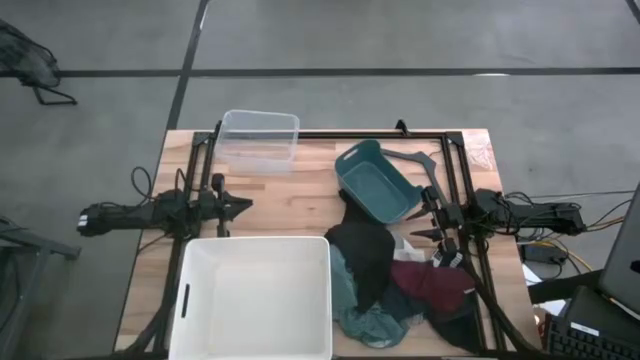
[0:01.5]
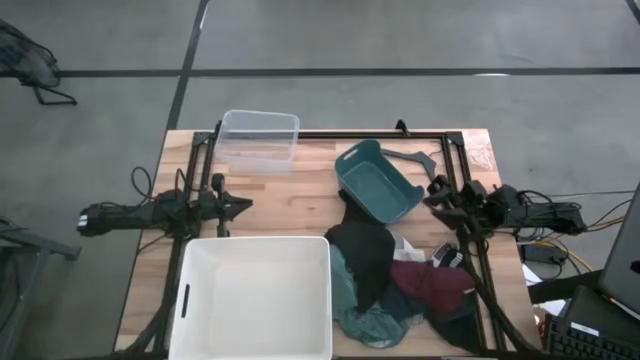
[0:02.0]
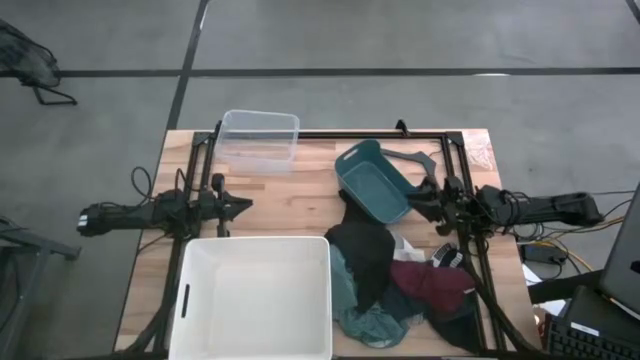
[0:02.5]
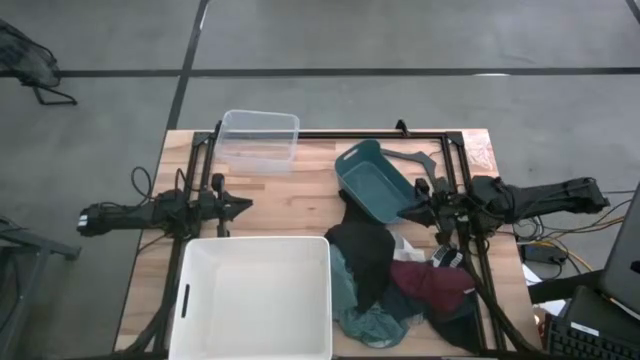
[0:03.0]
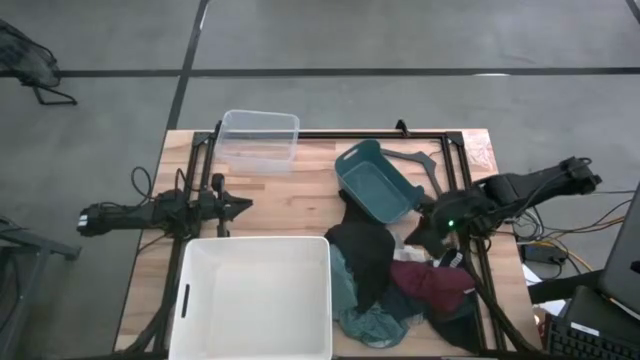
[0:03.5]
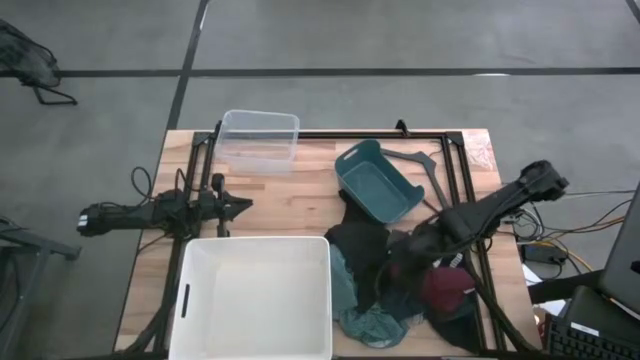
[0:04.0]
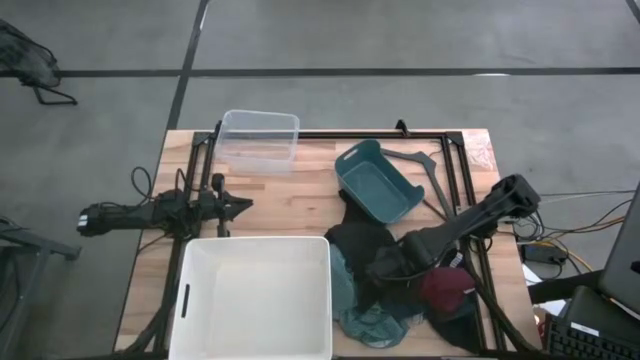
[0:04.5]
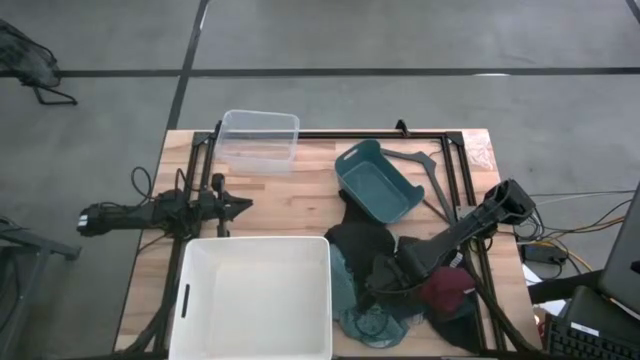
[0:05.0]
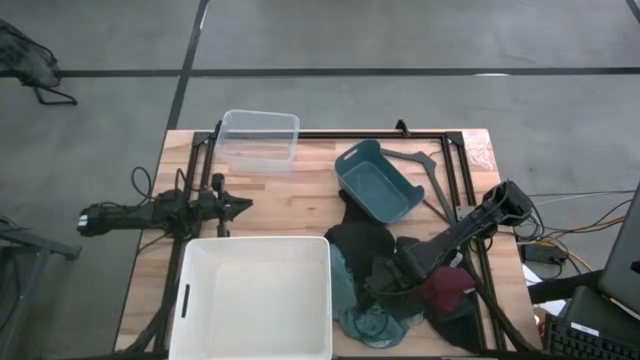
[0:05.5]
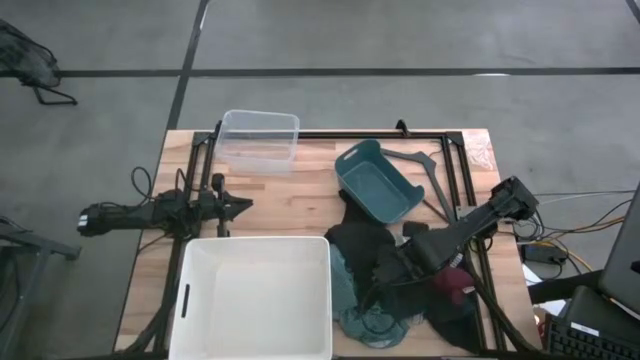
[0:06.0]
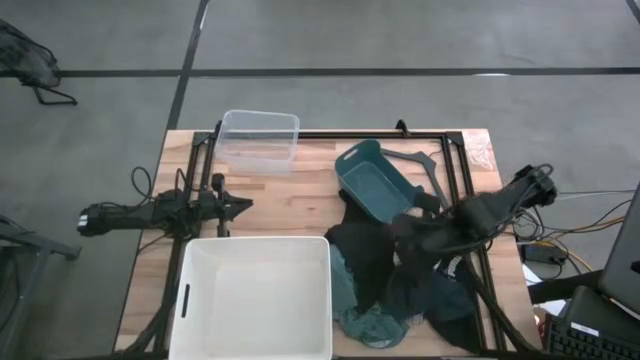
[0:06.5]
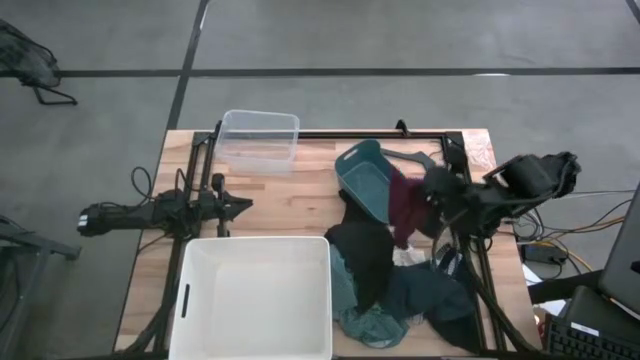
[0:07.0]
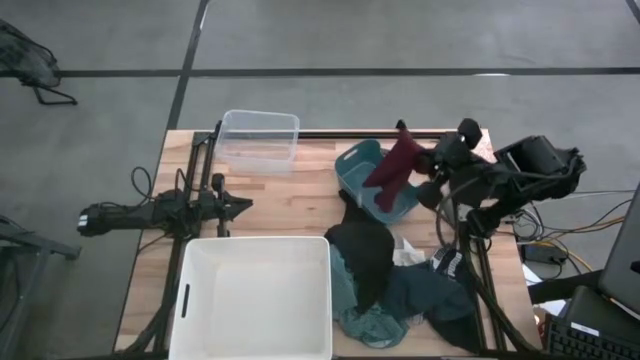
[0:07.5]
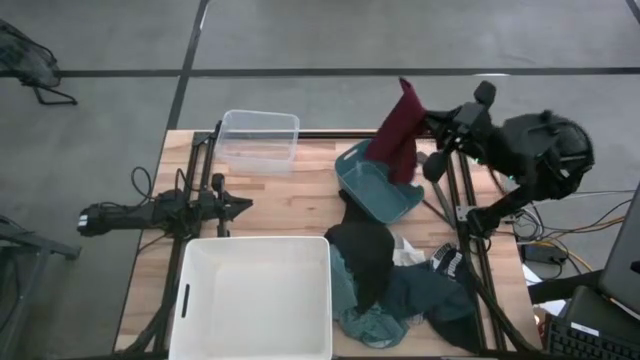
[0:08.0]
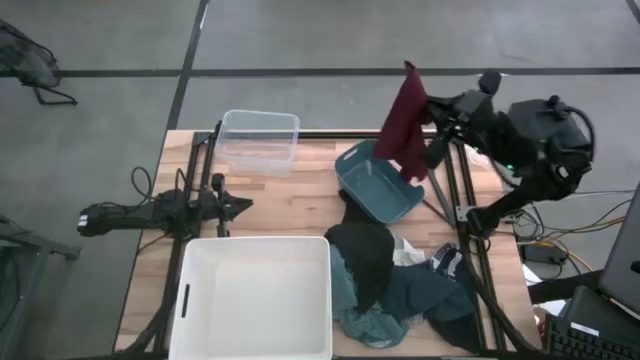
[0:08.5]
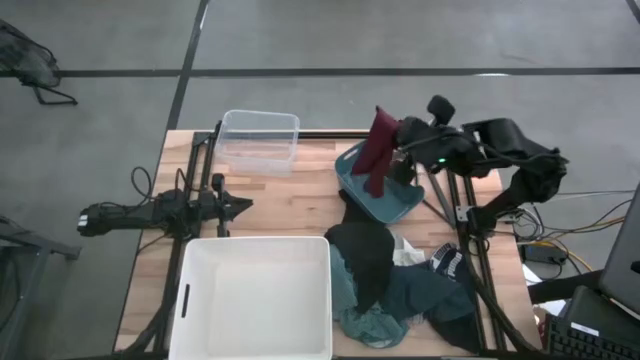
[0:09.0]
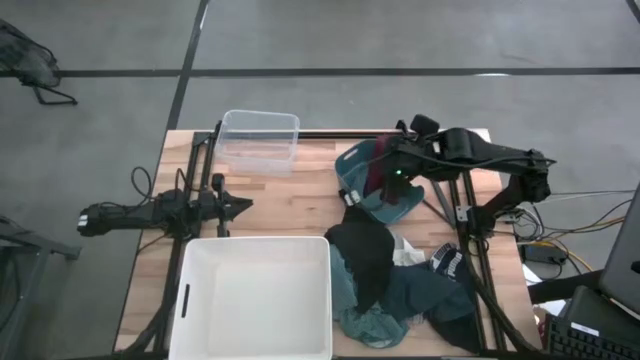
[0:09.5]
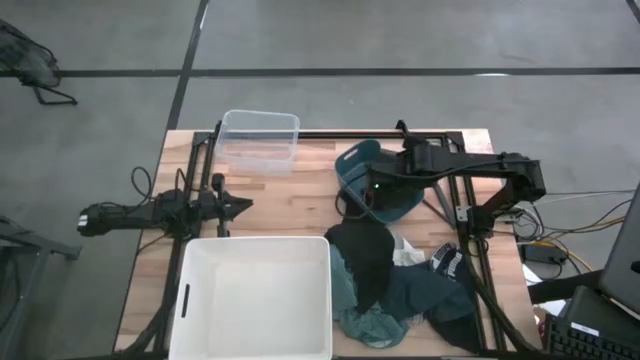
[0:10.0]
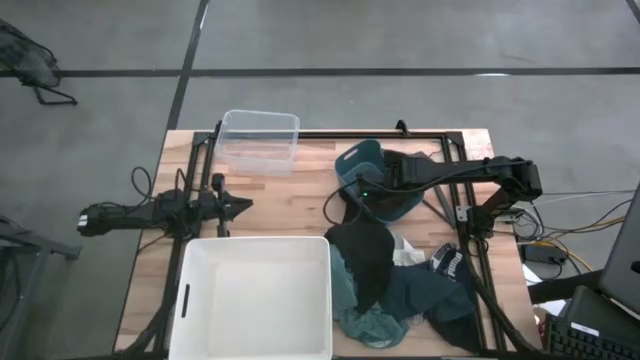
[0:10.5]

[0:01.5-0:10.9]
Task: Pick & Place Cloths
Put the red boxers into the blue bin

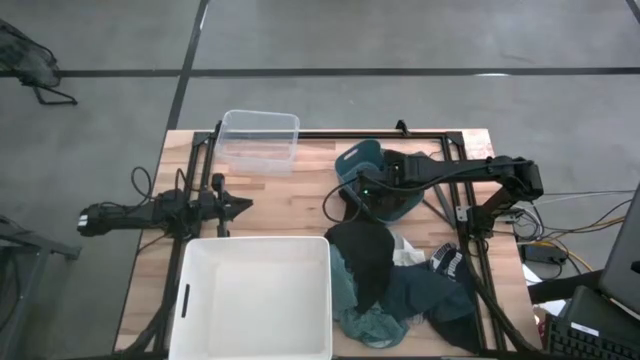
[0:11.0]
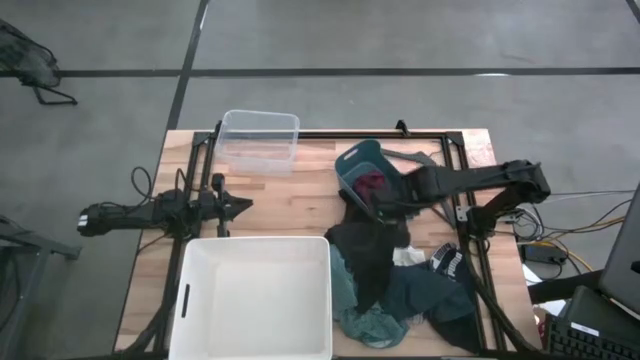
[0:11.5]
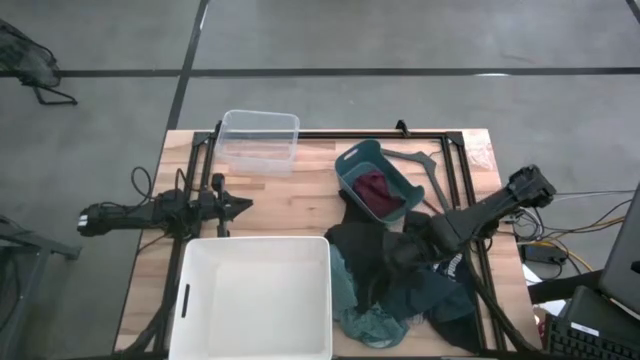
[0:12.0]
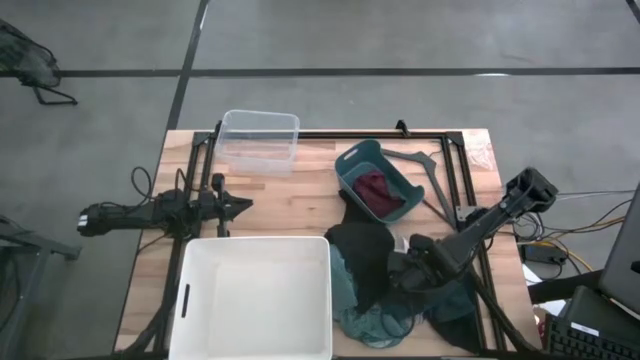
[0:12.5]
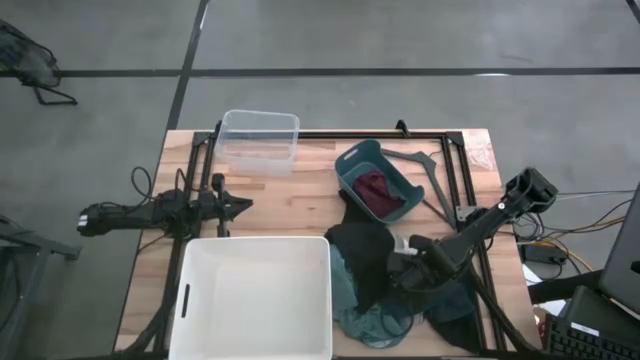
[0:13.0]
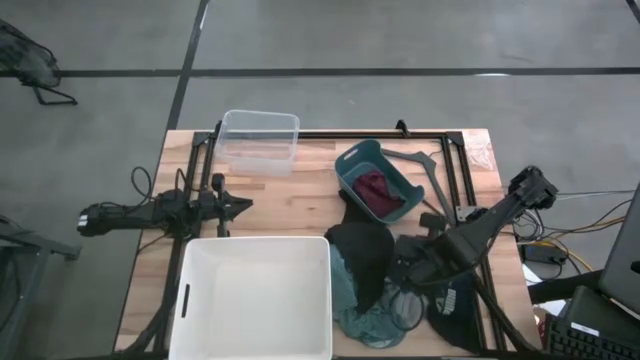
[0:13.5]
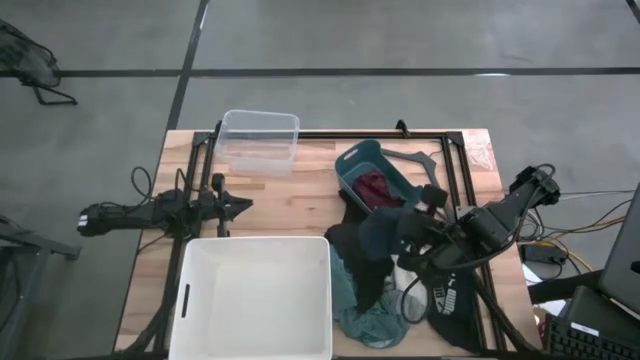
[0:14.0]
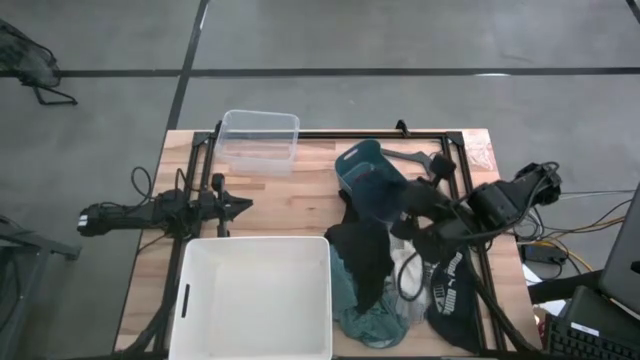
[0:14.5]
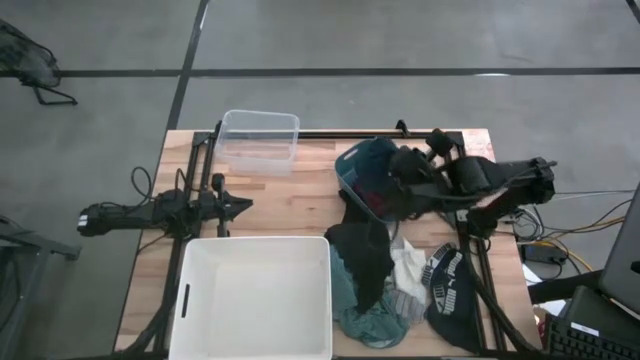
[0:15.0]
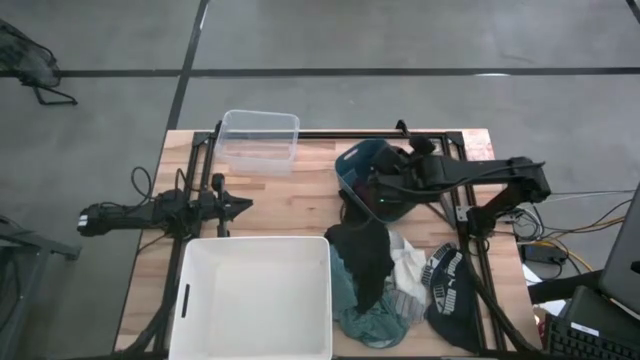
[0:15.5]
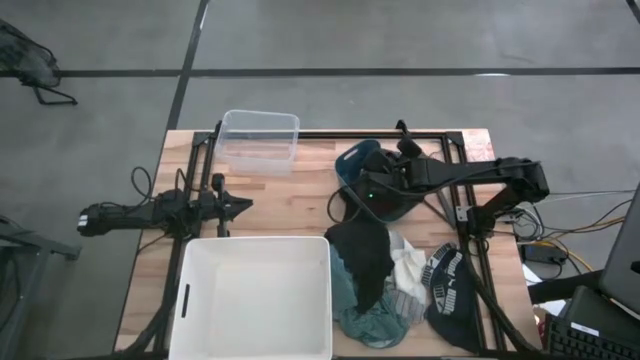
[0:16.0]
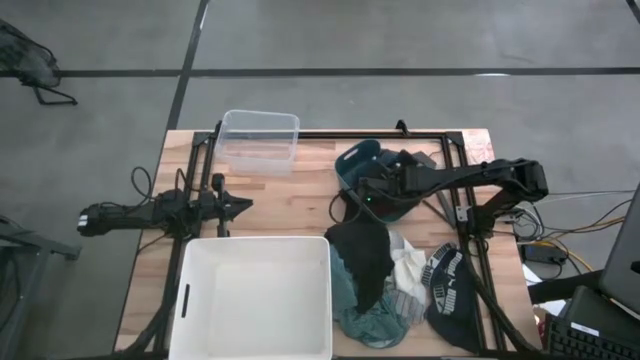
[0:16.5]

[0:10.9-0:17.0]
Put the blue shorts into the blue bin

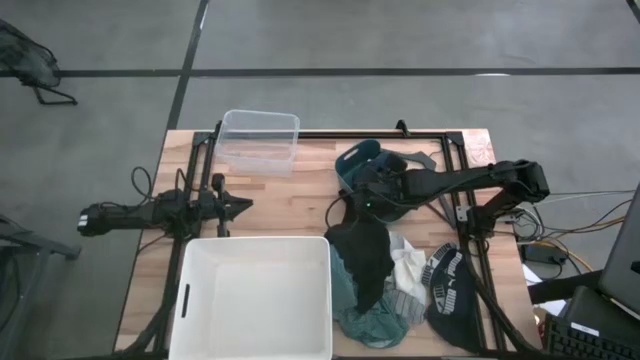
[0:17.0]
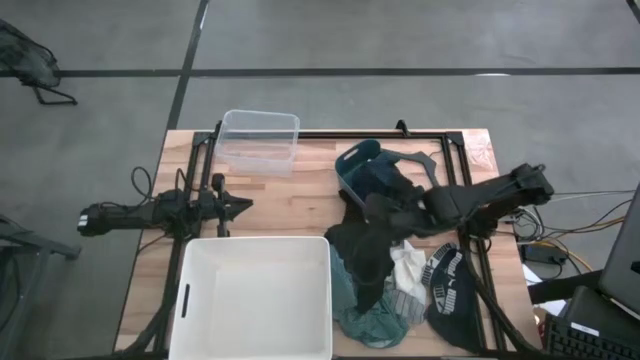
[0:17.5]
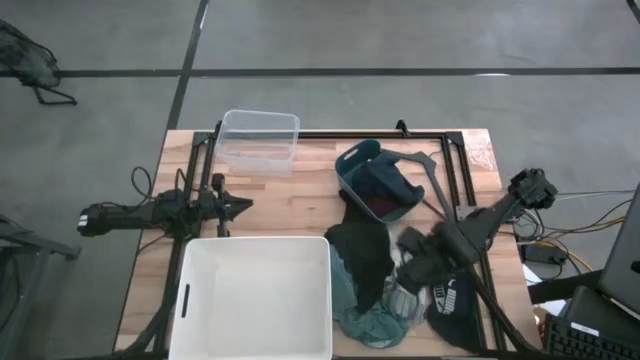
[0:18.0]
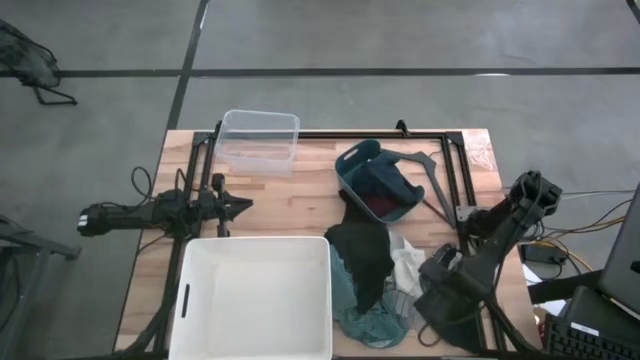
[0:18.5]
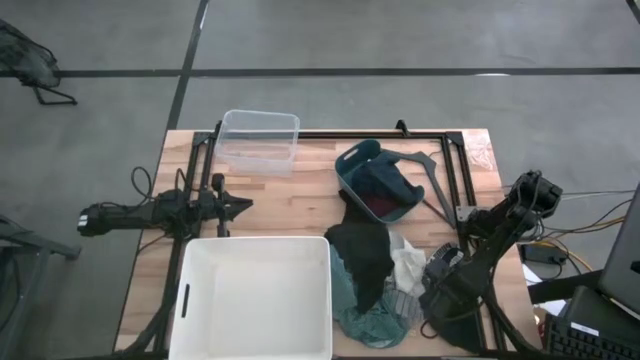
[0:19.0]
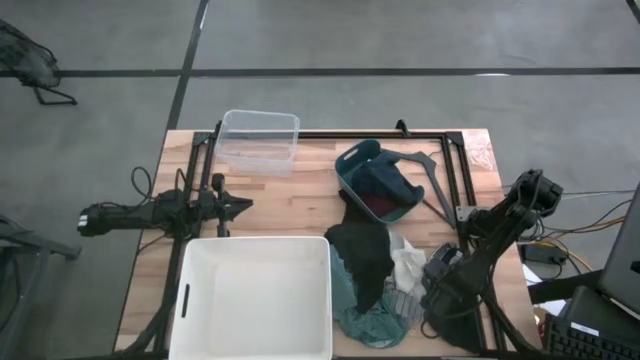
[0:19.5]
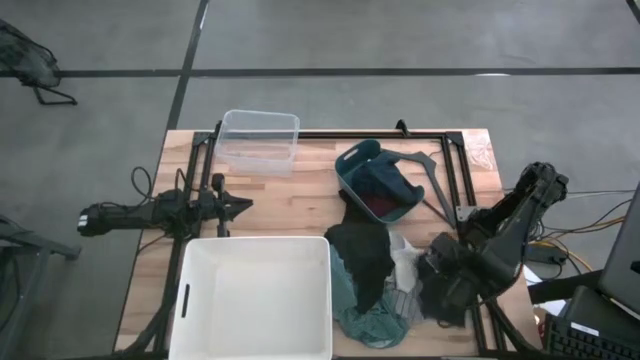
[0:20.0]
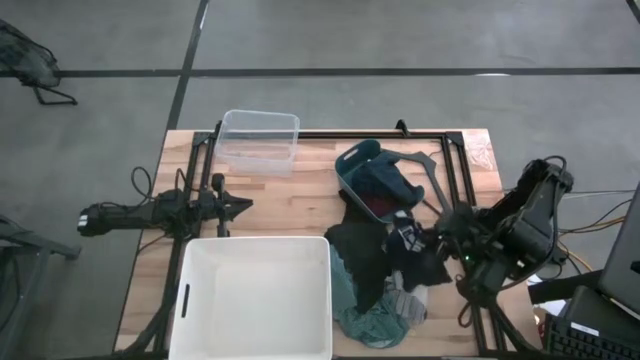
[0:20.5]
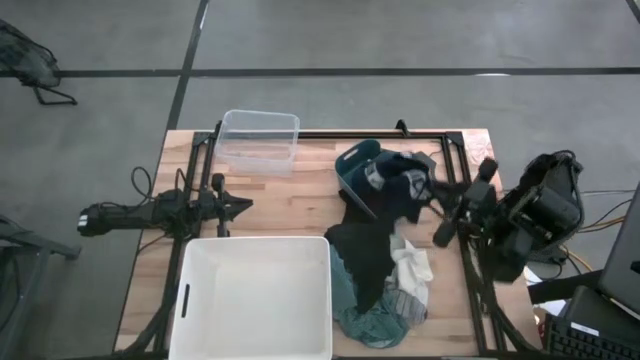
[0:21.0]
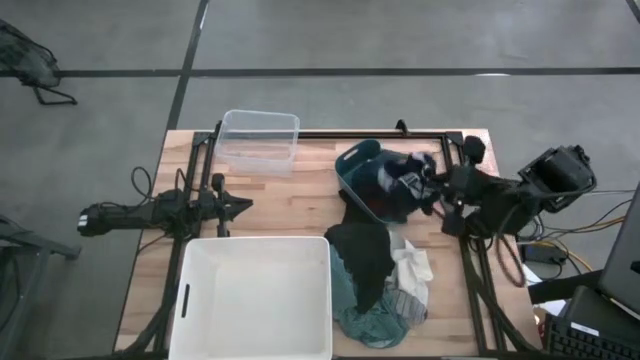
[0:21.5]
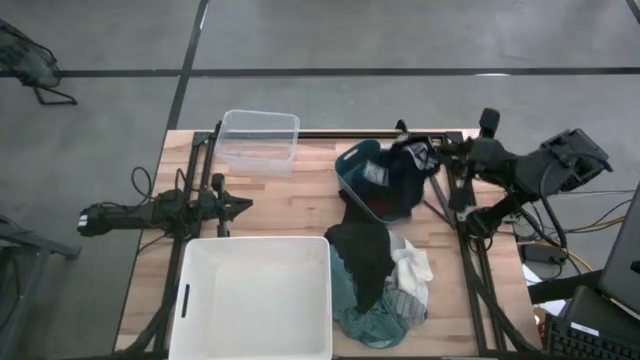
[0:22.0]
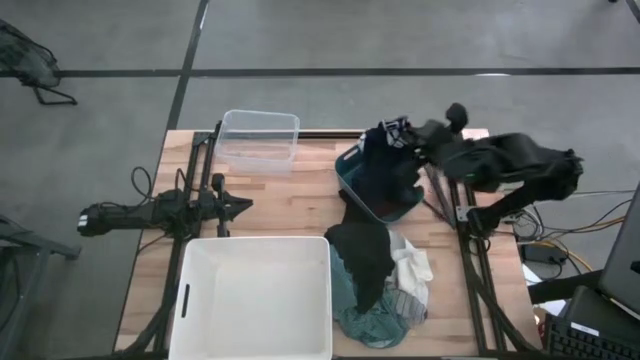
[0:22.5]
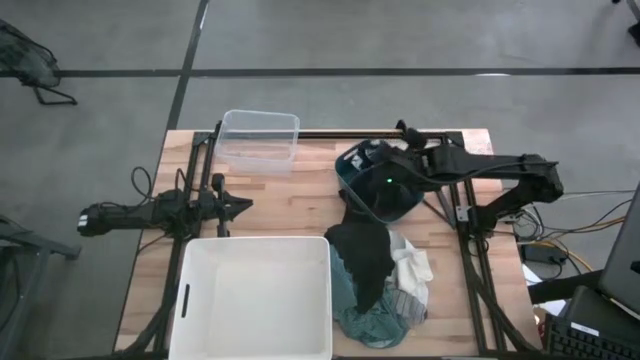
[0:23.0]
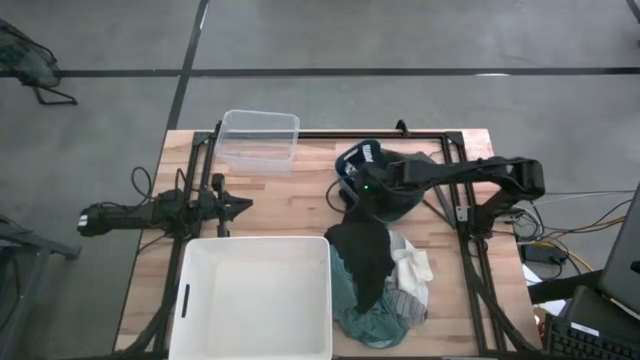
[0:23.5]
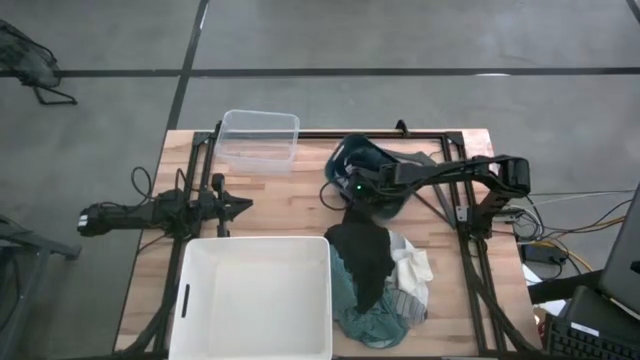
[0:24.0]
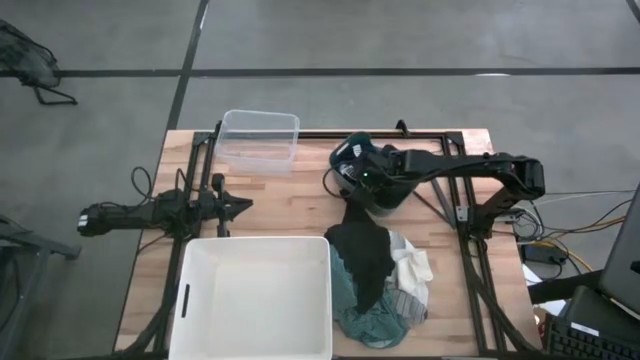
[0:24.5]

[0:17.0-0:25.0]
Put the blue boxers into the blue bin
